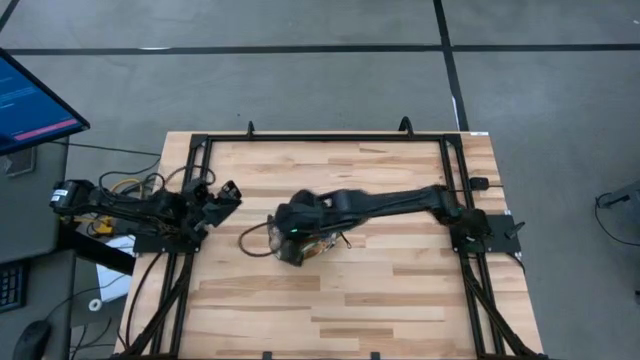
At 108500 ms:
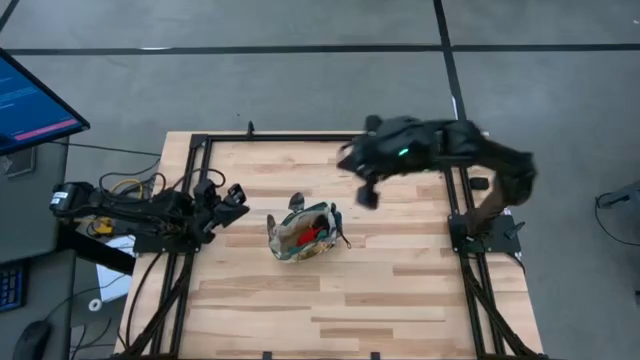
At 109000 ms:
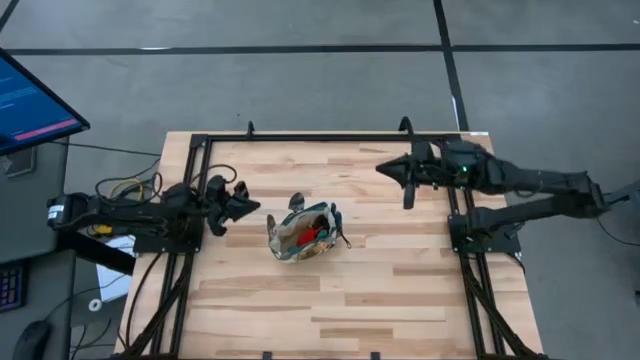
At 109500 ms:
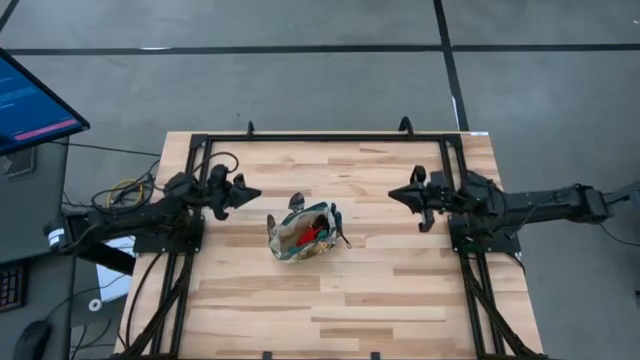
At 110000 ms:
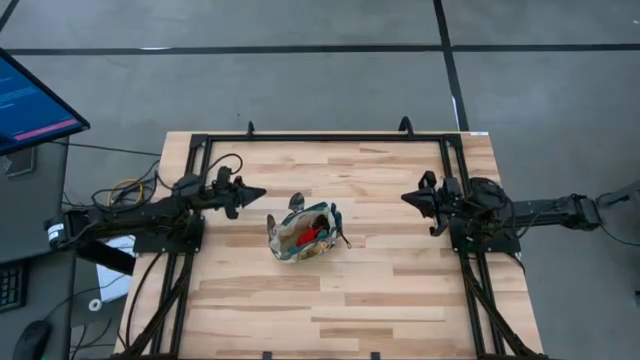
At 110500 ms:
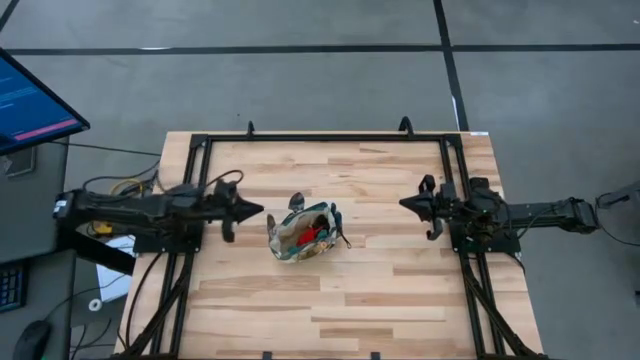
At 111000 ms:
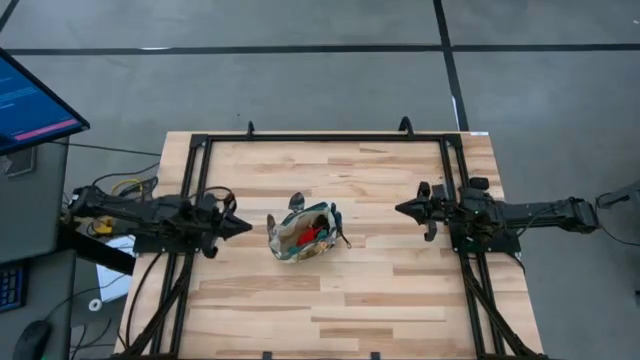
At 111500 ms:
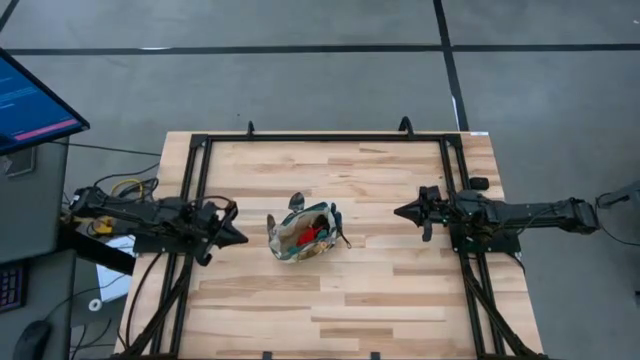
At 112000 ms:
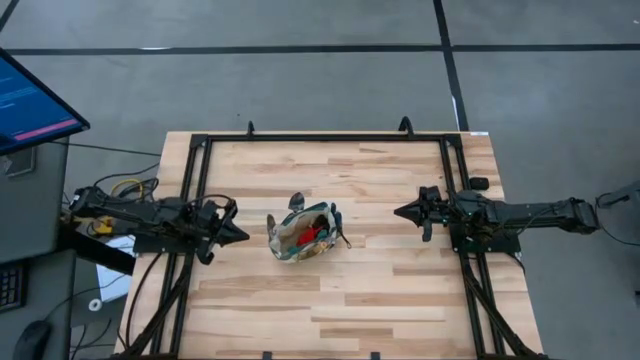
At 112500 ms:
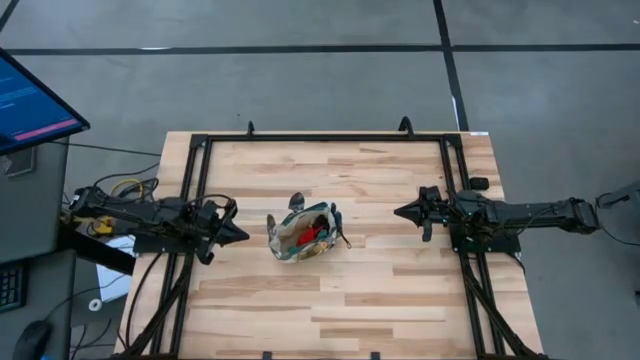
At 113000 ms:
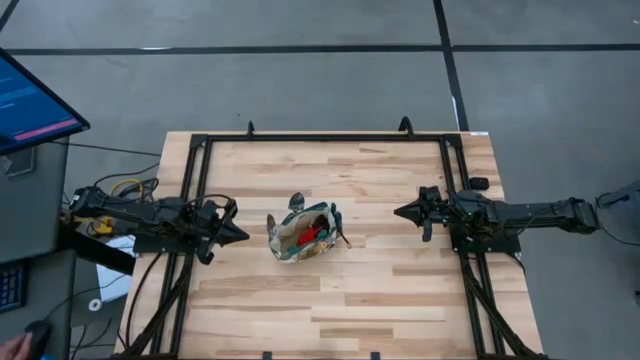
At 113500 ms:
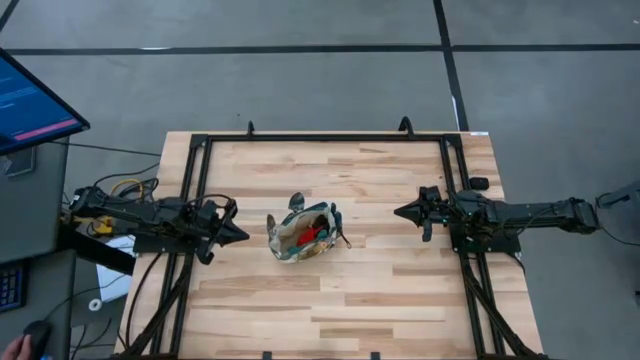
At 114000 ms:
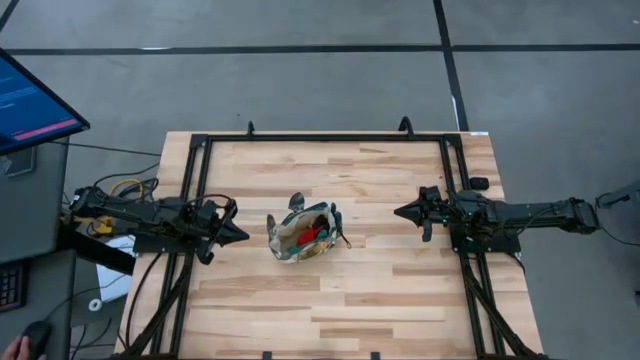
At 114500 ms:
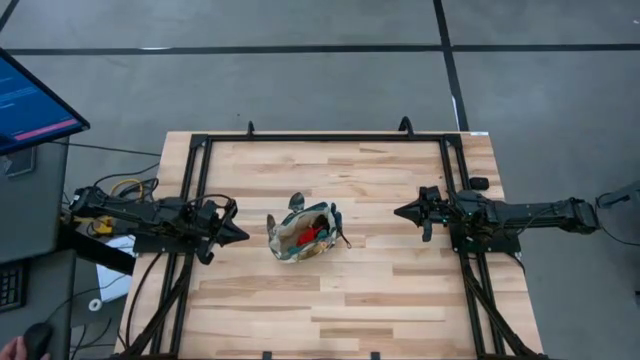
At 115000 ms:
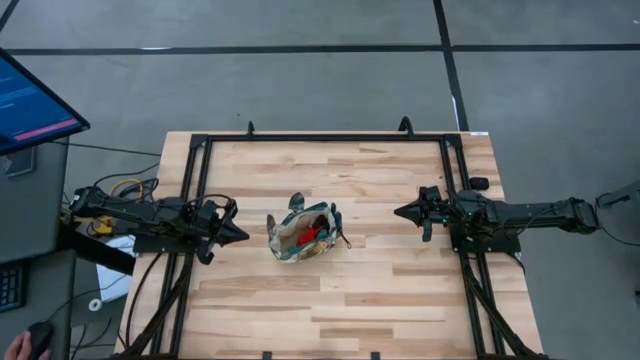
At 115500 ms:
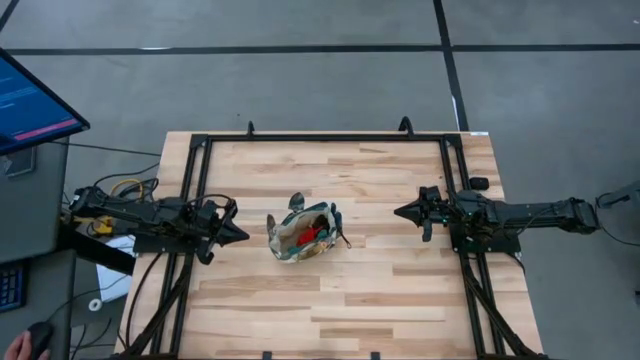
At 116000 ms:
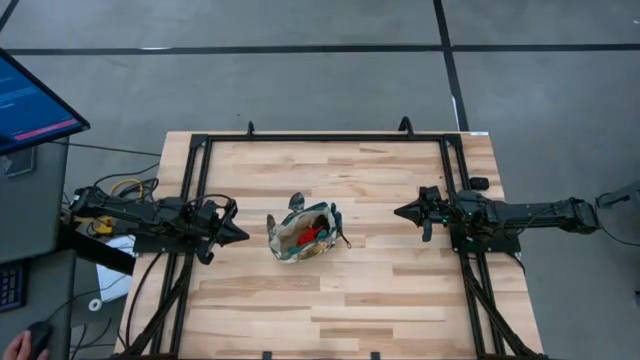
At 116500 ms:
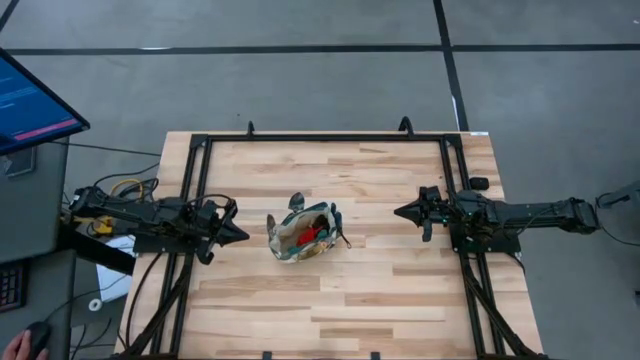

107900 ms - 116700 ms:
Task: Pick & Place Garden tools in Gardening bag
Return to Home Position

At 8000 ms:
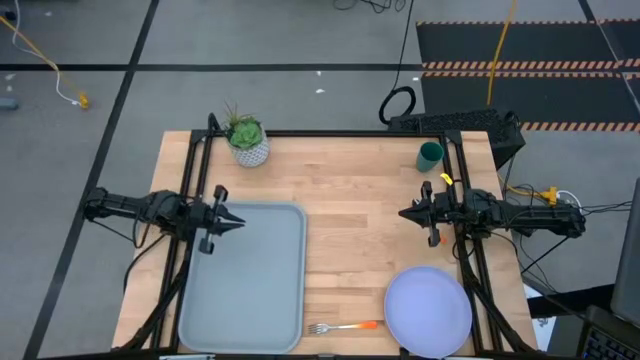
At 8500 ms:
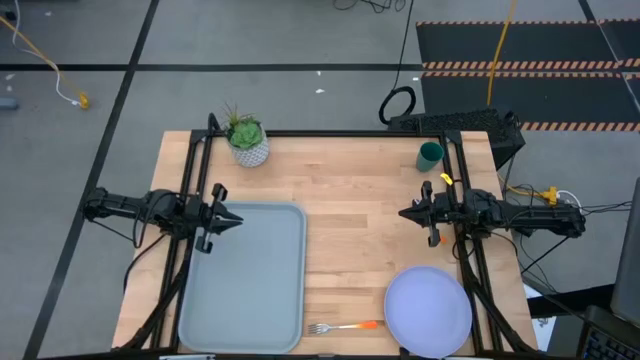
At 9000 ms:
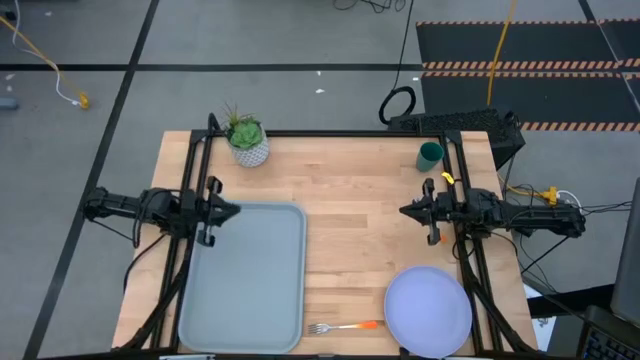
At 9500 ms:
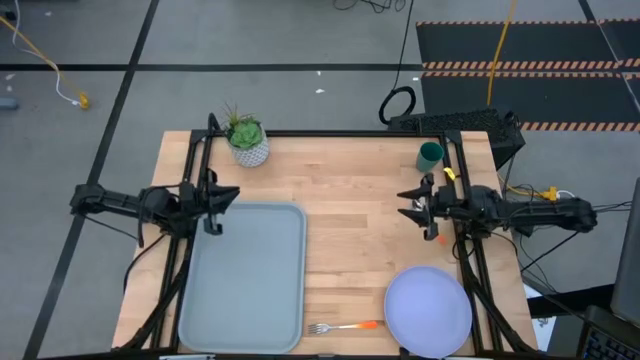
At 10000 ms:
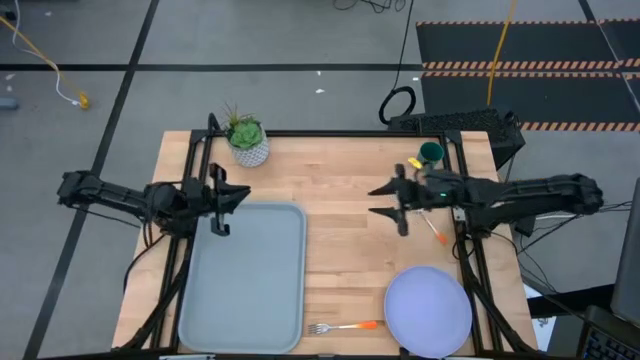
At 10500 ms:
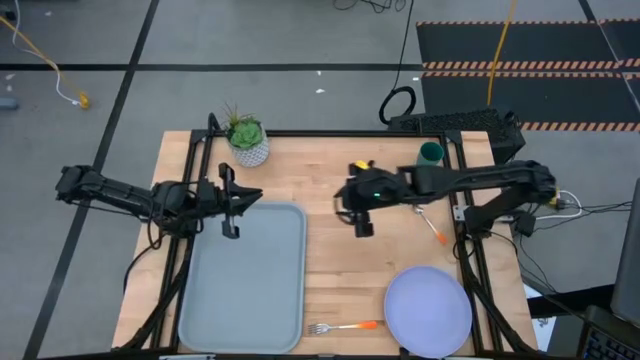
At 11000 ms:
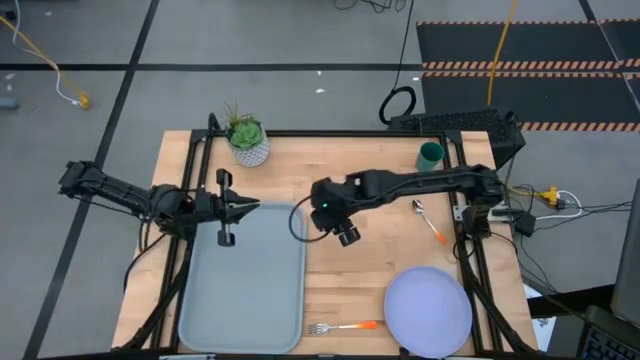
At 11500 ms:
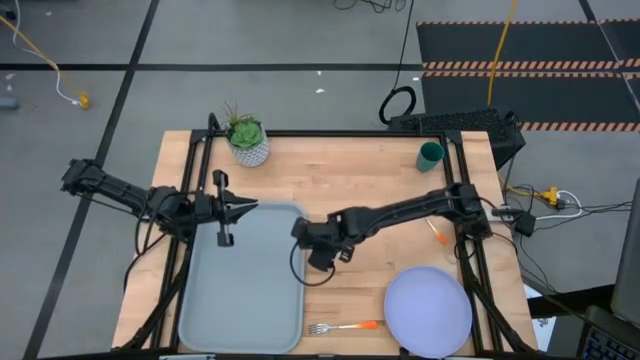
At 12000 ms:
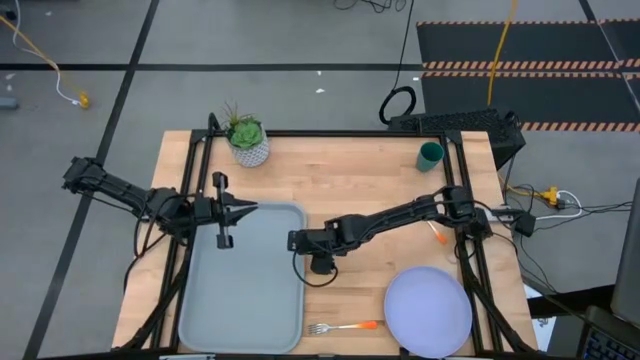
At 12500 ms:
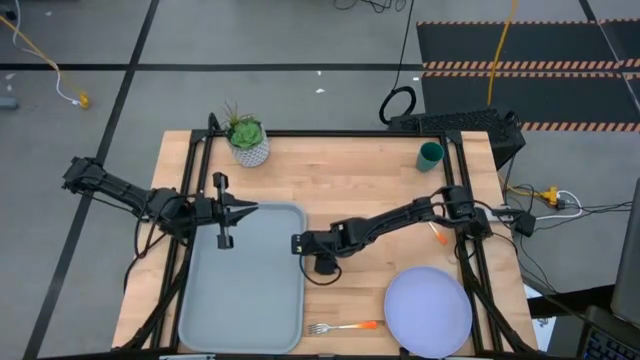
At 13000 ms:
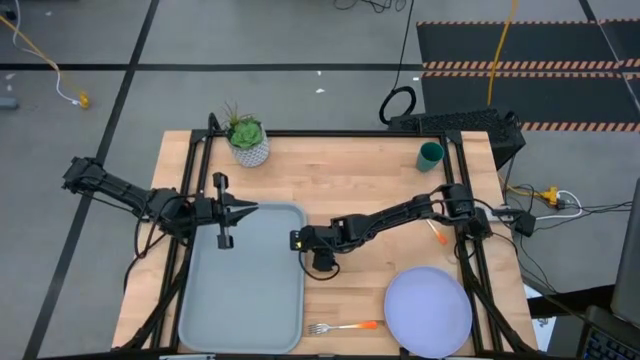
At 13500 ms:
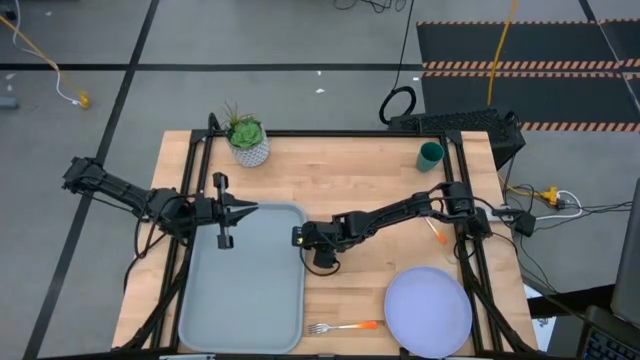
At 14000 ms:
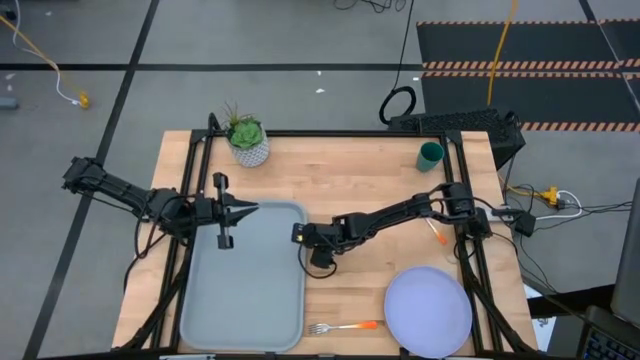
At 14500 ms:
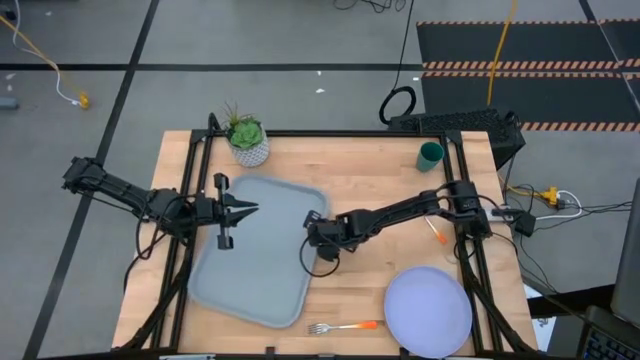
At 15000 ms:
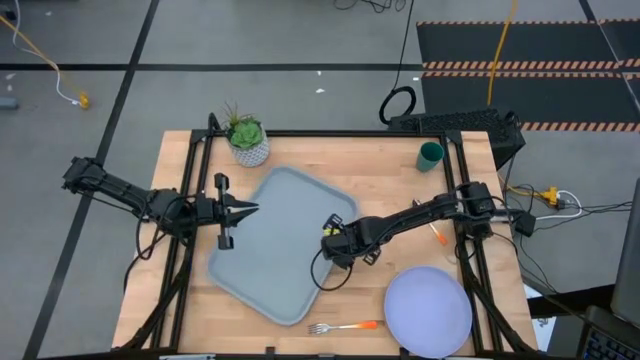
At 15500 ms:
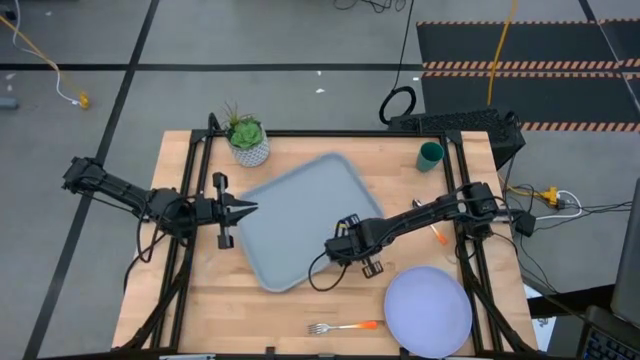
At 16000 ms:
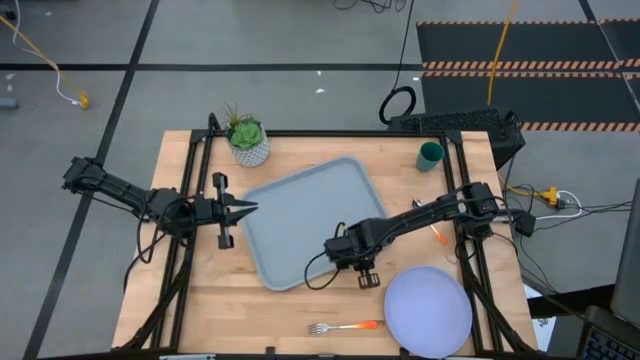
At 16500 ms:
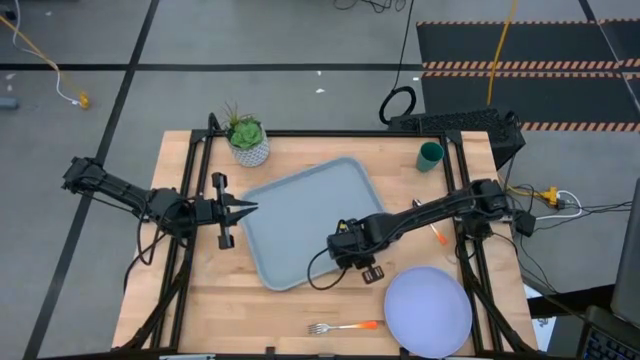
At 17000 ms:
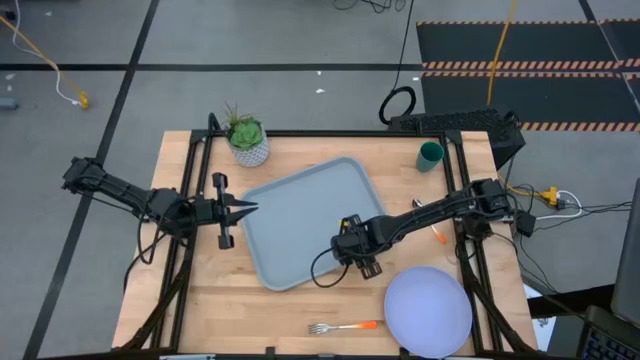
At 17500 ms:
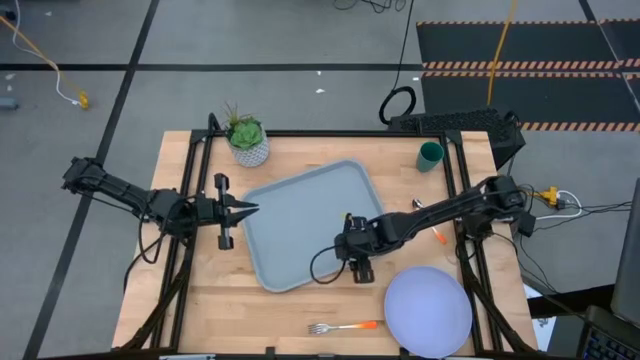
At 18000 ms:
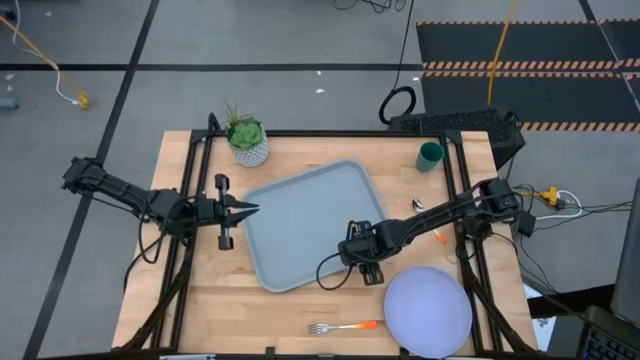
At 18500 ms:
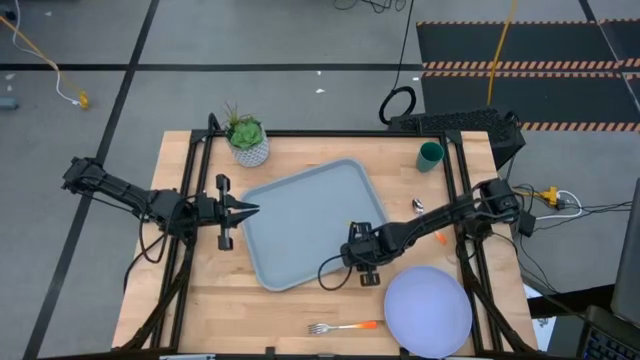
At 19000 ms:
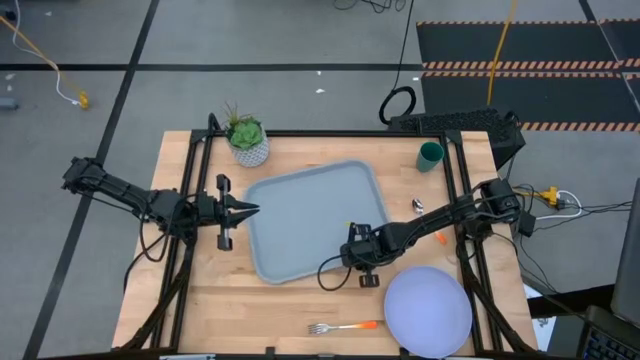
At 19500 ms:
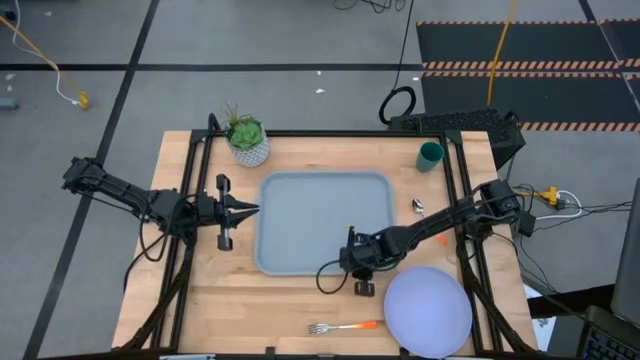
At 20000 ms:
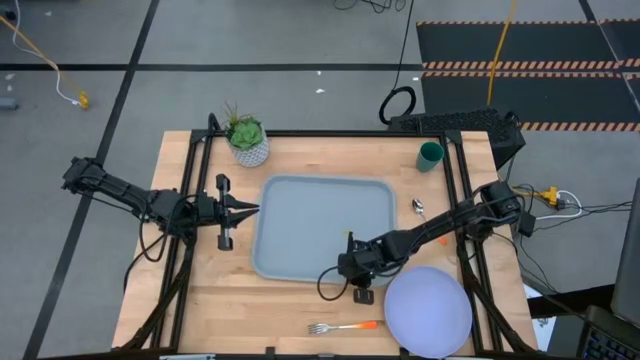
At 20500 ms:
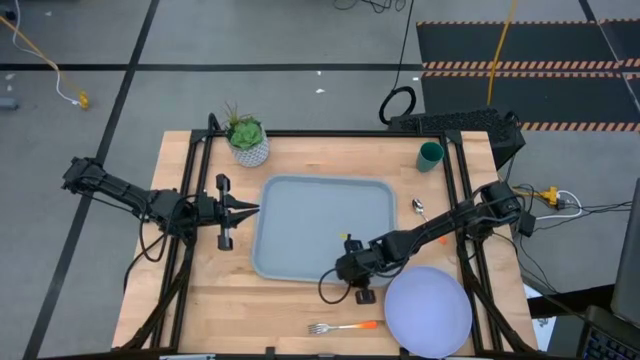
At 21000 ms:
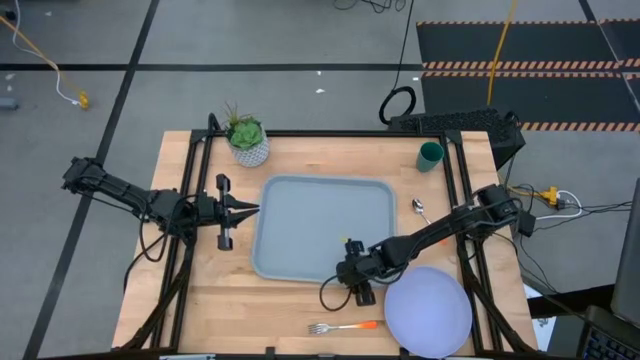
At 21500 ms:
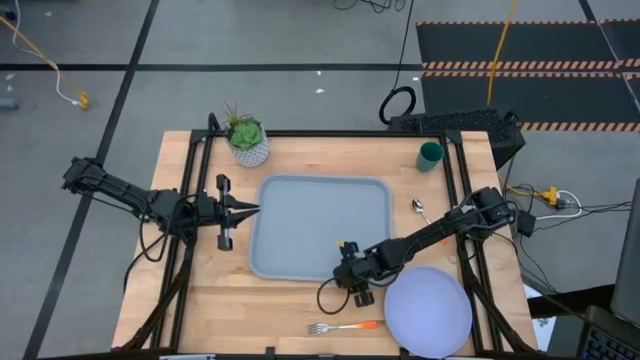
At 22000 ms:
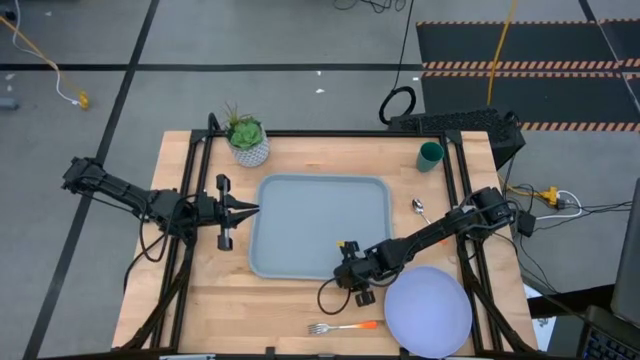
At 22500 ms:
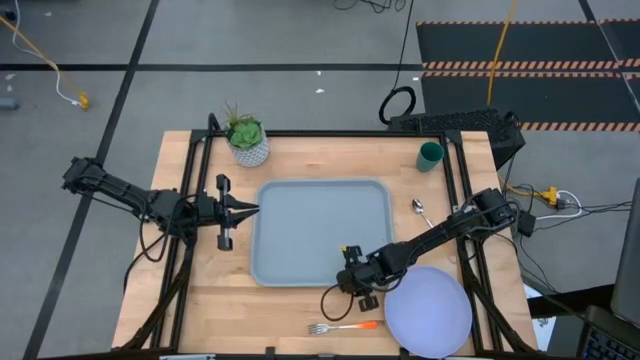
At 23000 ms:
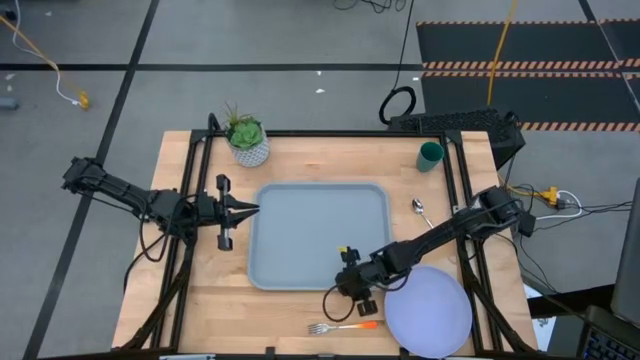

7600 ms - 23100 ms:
Task: Pick and place plate/cup/fork/spoon on tray
Move the blue tray to the center of the table
